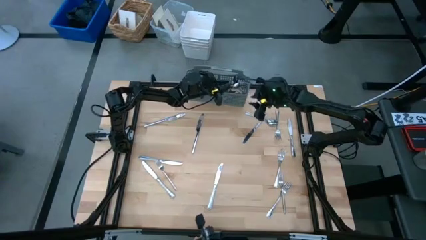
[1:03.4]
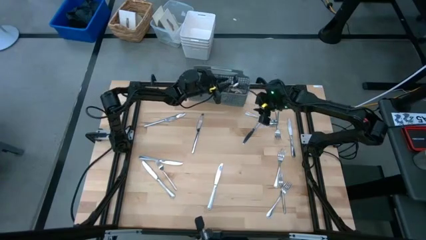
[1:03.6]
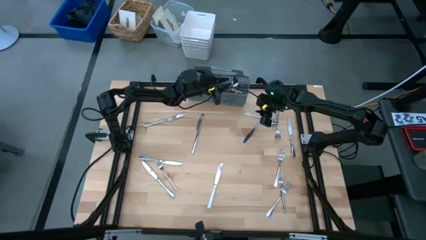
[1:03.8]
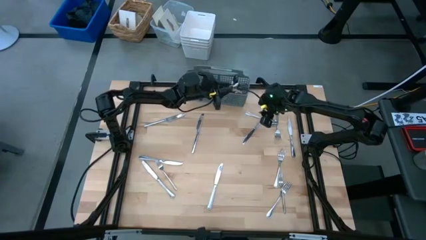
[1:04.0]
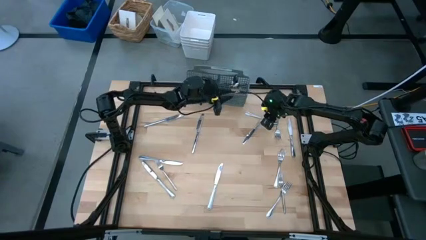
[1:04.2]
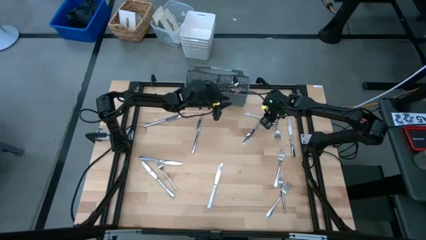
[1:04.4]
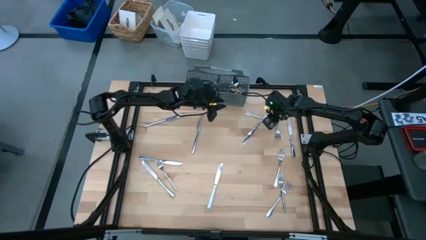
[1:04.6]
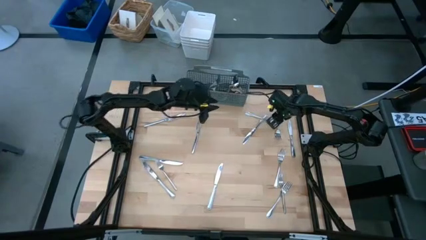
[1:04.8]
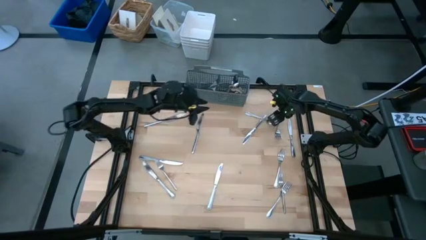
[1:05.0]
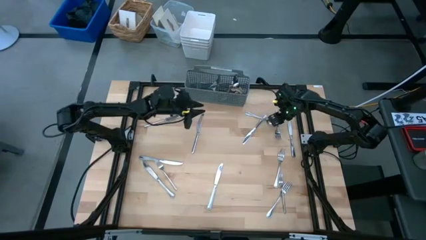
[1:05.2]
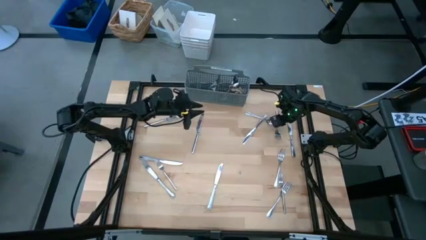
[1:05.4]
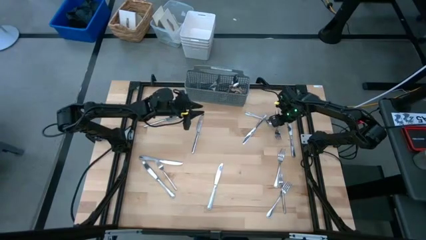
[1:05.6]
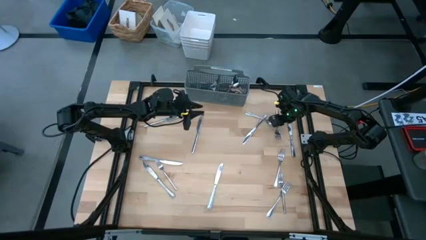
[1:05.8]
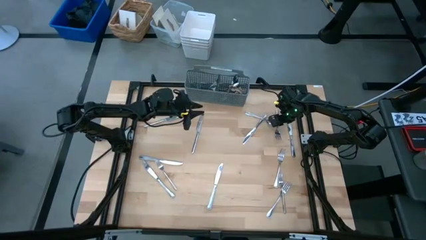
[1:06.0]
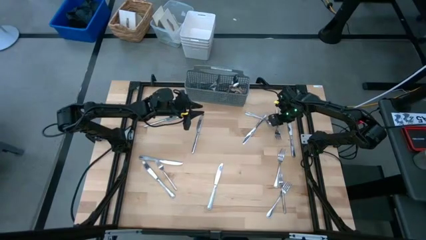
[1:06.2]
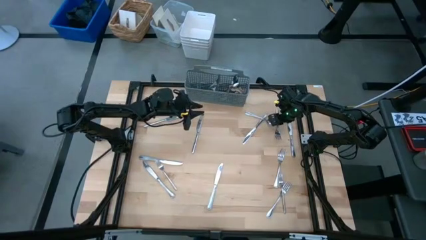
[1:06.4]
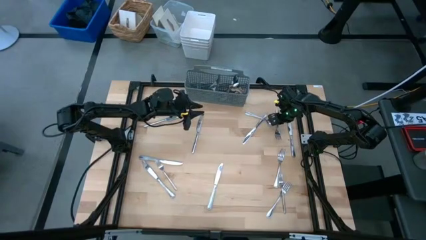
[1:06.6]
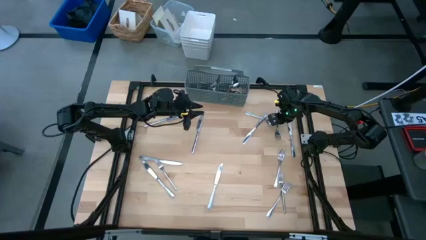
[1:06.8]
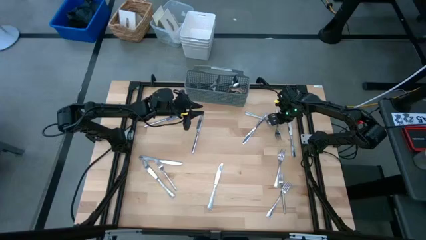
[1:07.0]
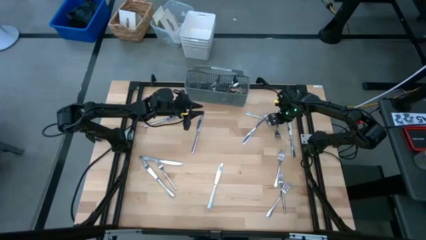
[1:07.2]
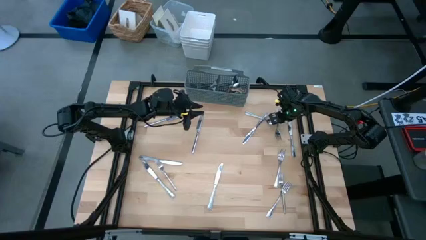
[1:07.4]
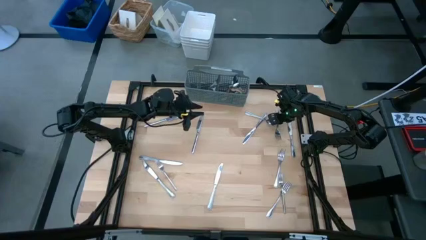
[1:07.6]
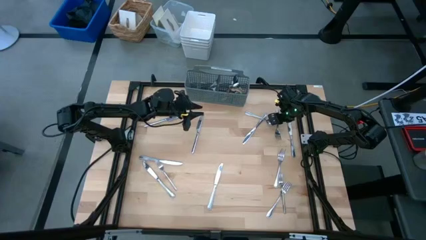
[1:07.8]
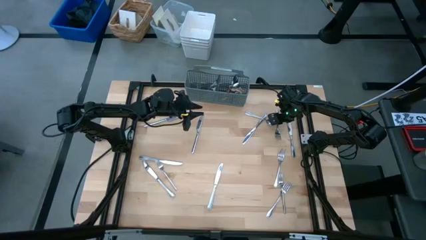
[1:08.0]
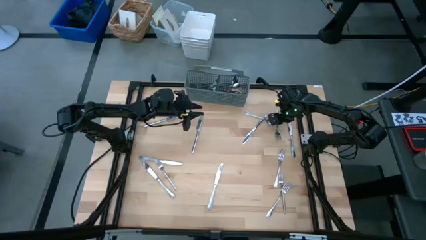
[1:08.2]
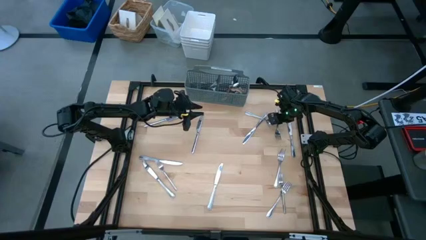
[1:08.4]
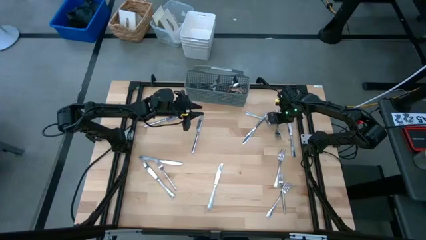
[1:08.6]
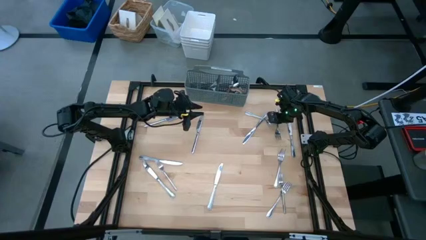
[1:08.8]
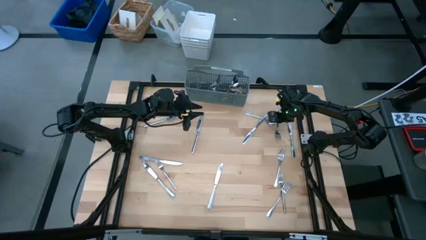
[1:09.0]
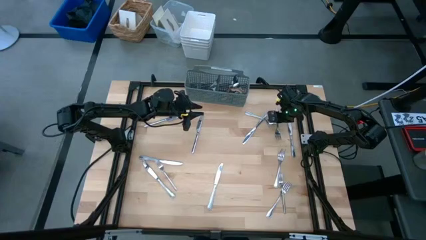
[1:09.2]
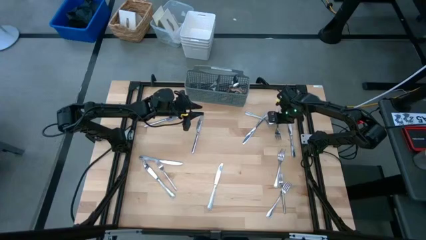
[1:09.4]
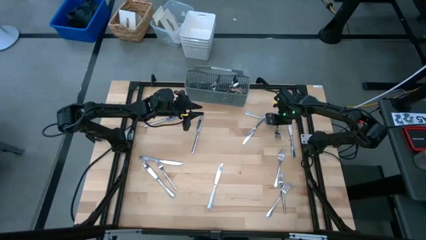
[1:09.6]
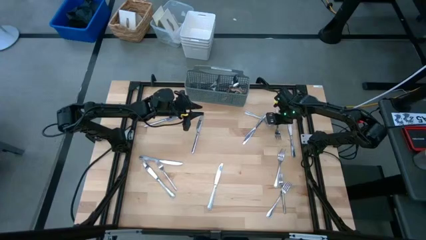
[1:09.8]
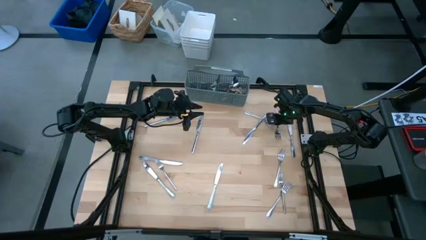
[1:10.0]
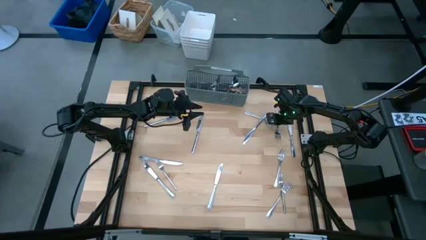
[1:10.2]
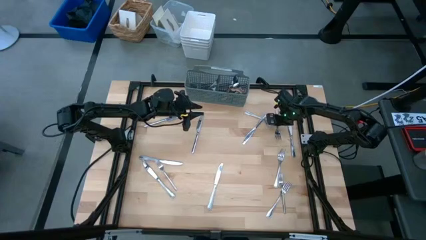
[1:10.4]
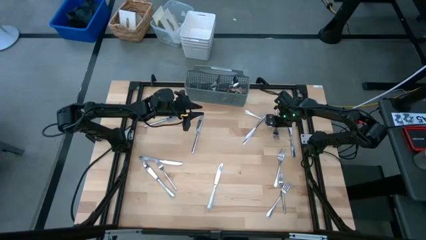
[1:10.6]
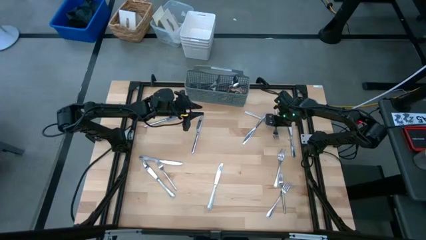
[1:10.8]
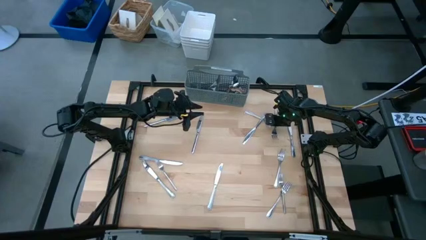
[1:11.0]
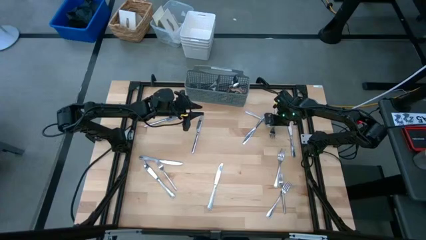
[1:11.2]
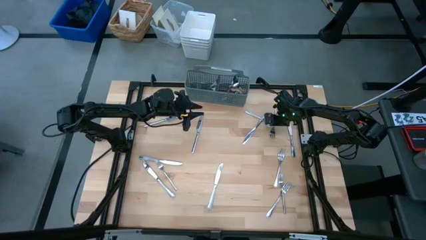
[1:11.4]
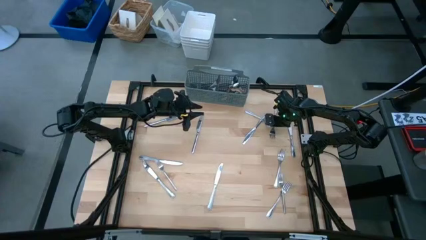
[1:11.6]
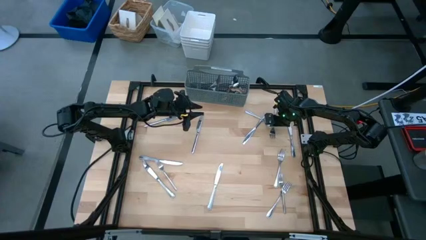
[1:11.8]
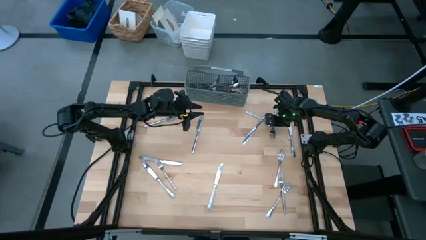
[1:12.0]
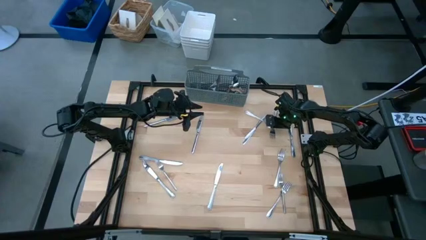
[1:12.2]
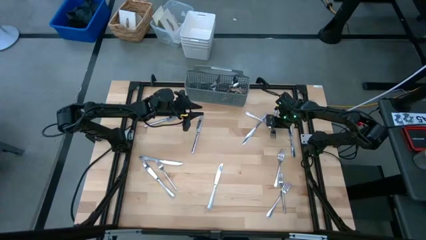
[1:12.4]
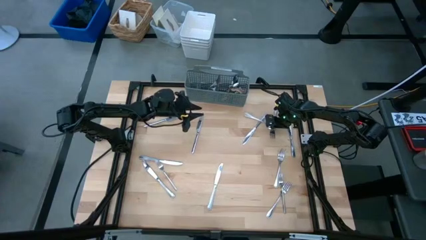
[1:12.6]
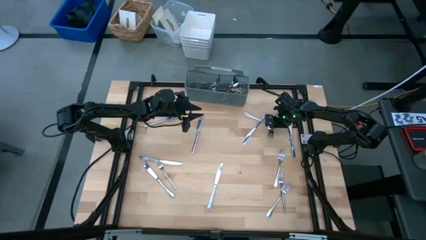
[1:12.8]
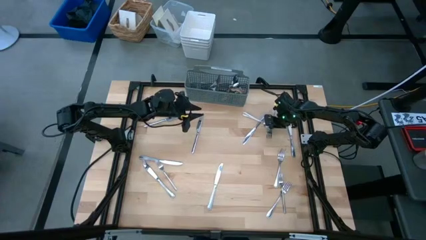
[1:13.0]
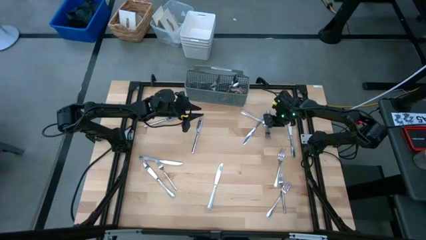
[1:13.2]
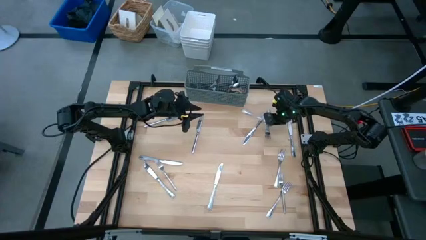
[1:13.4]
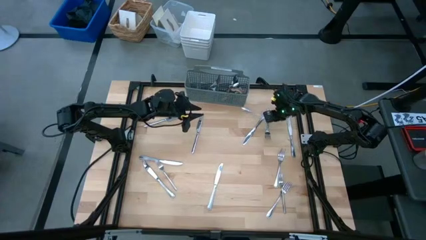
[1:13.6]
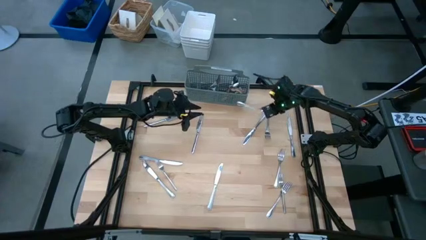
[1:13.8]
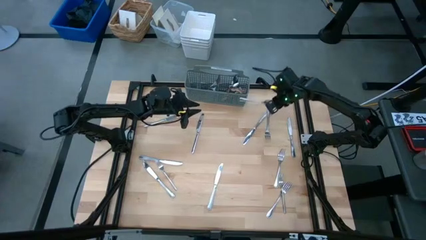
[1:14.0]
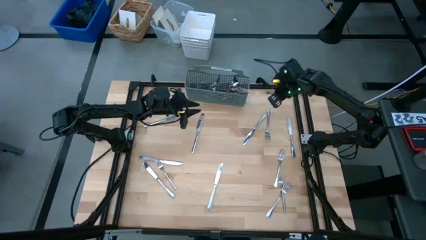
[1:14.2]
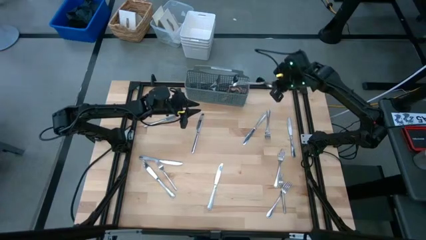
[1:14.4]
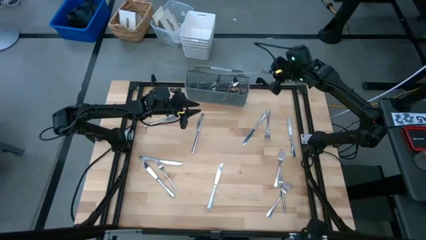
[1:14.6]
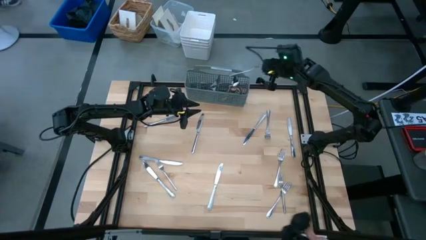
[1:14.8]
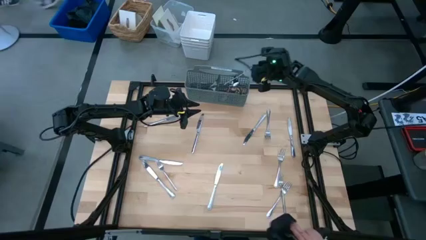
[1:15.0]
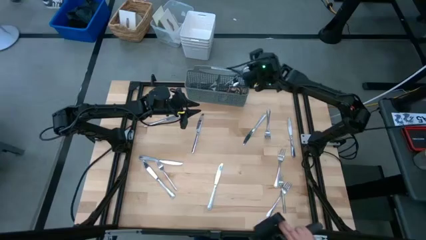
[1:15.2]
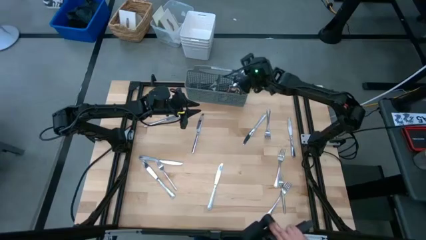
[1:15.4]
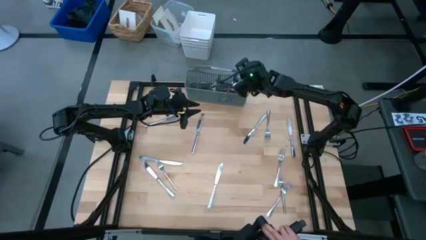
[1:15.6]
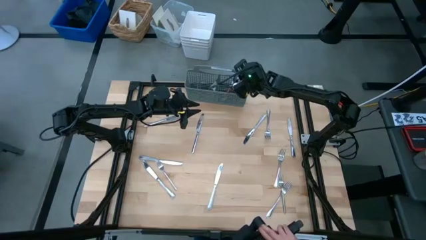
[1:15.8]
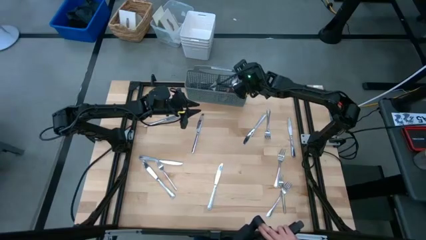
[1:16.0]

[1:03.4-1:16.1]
Task: Sort silverware
Put the spoon into the gray silverware organizer

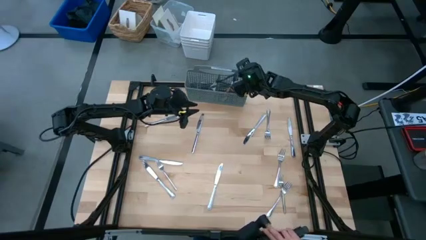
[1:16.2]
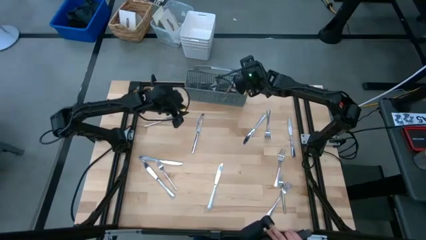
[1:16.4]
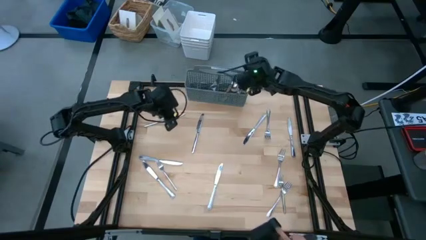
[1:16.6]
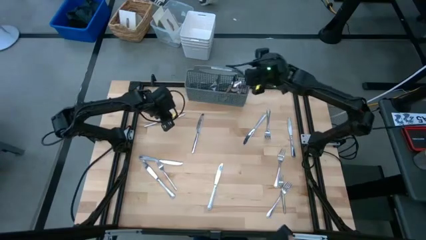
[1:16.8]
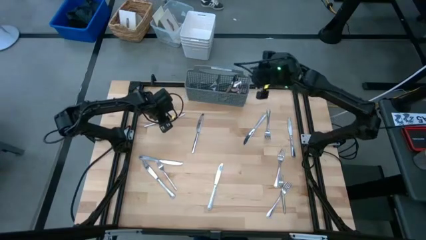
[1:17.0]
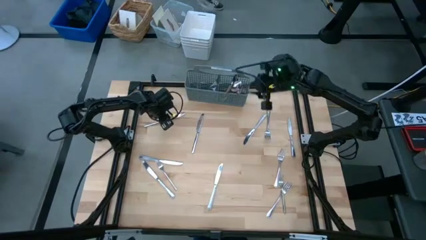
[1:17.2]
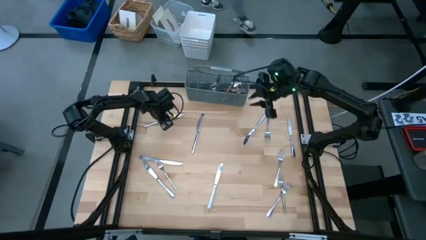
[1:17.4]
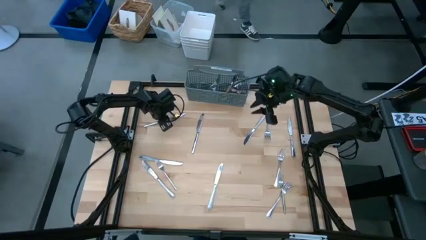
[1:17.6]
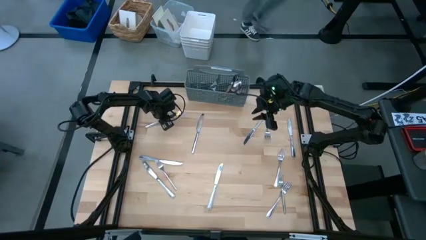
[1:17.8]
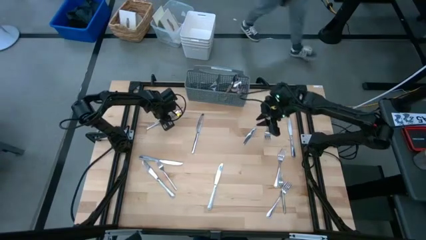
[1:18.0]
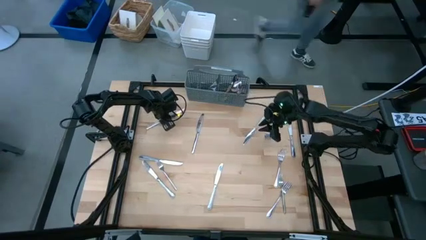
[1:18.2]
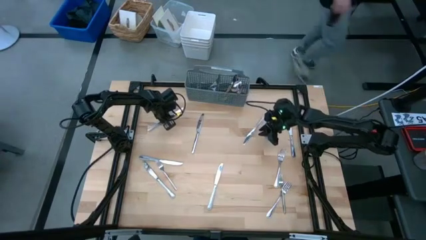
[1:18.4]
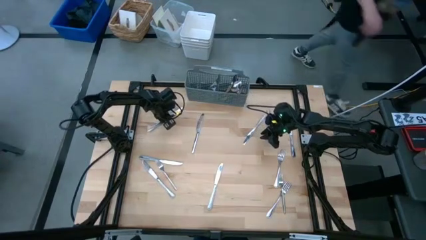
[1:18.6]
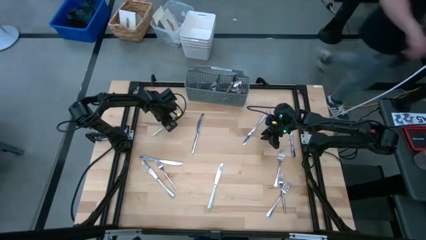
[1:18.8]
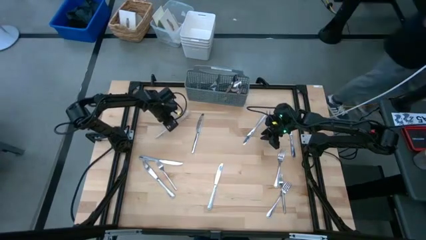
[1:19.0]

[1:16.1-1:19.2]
Put the table knife into the gray silverware organizer
